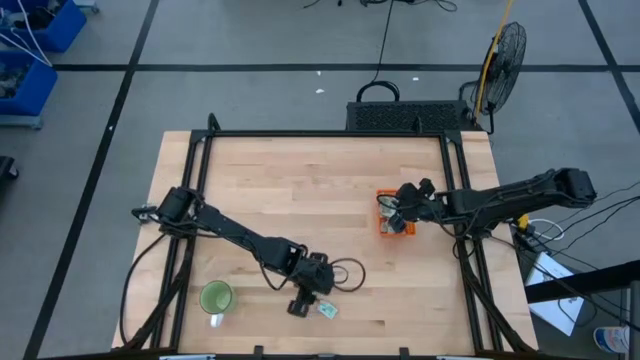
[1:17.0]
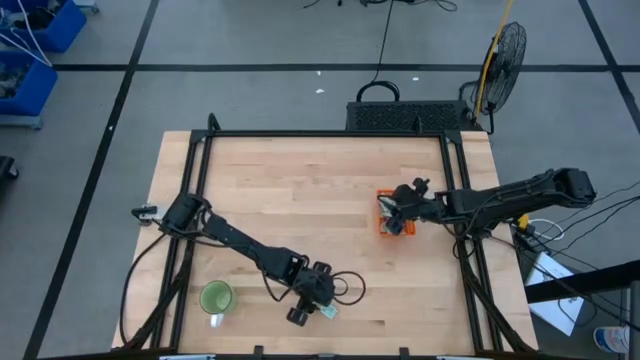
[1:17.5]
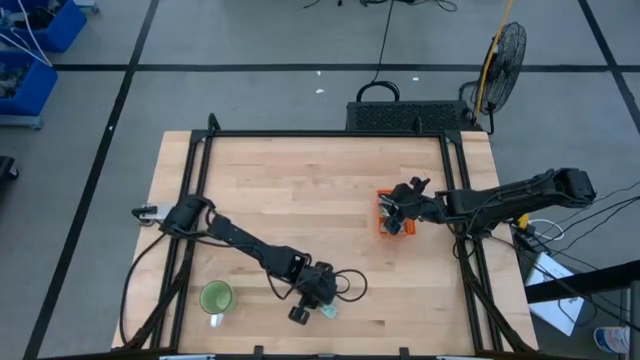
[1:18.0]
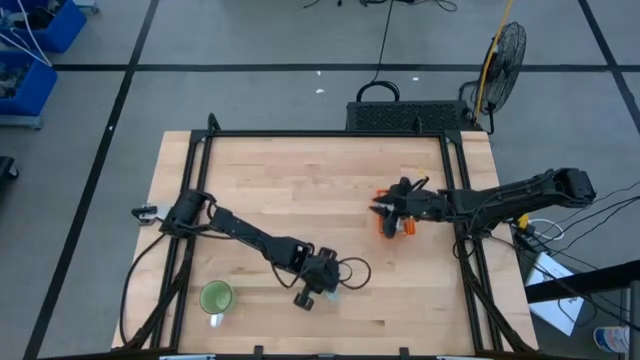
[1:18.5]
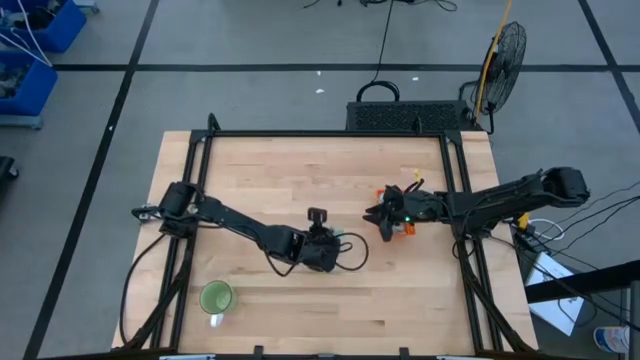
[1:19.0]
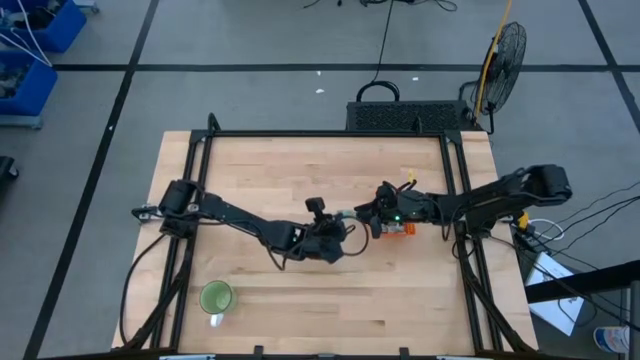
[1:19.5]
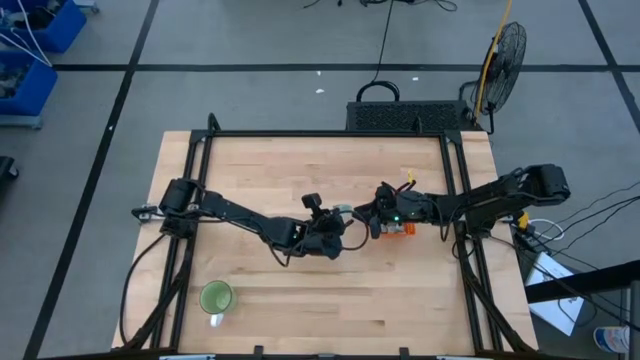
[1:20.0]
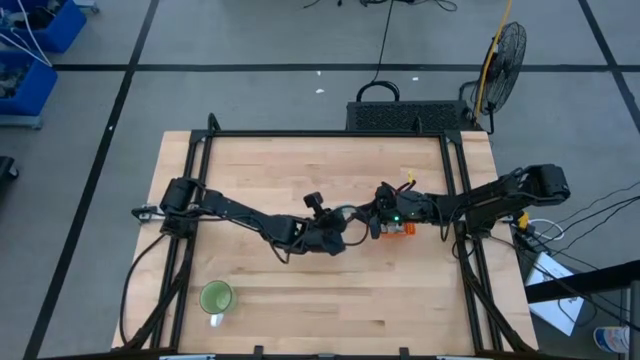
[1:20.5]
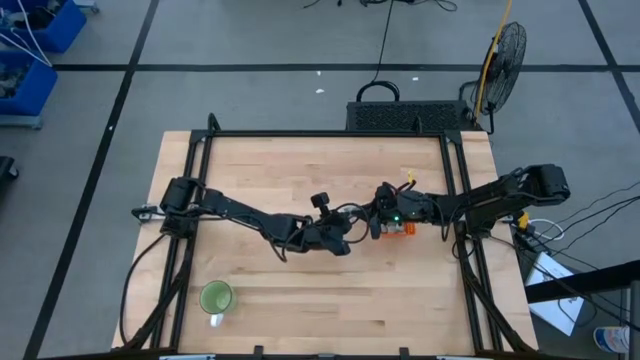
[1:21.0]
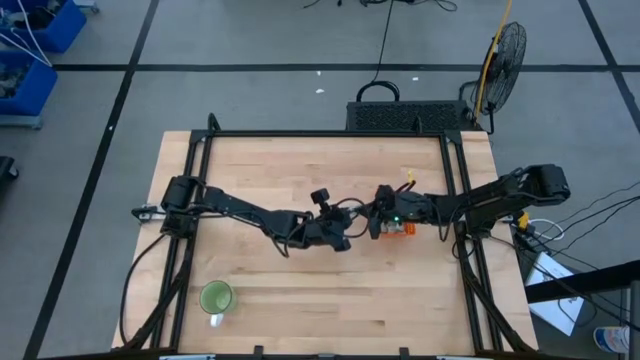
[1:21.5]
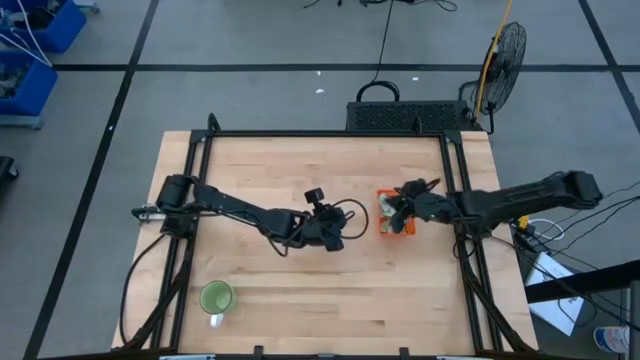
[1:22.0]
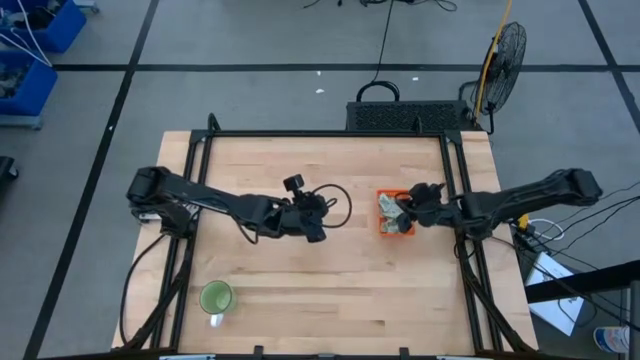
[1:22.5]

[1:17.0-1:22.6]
Task: Pick and place Stevia / Truvia into bins
Put the stevia packet into the orange basket

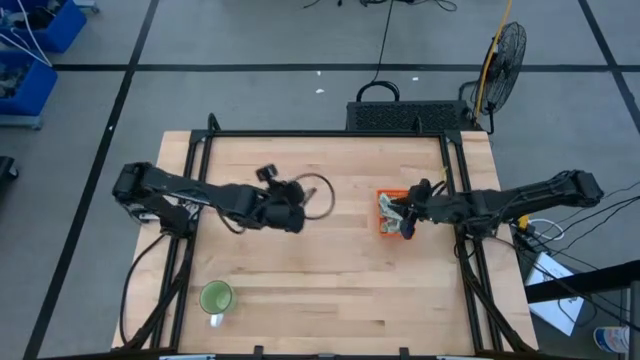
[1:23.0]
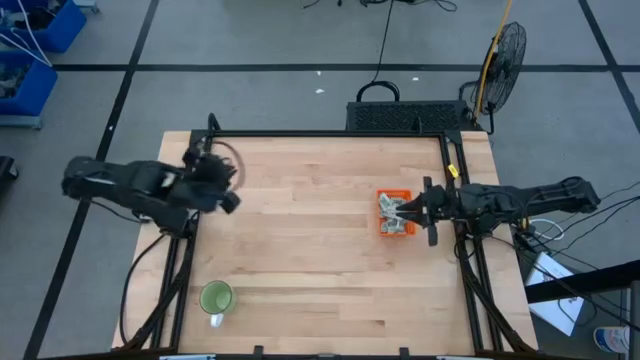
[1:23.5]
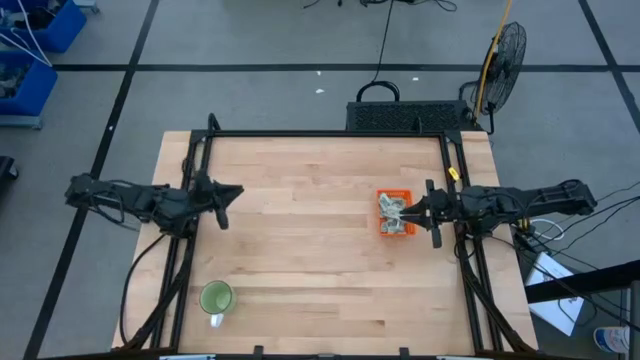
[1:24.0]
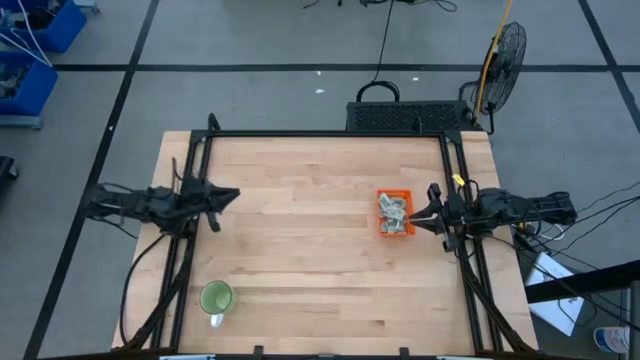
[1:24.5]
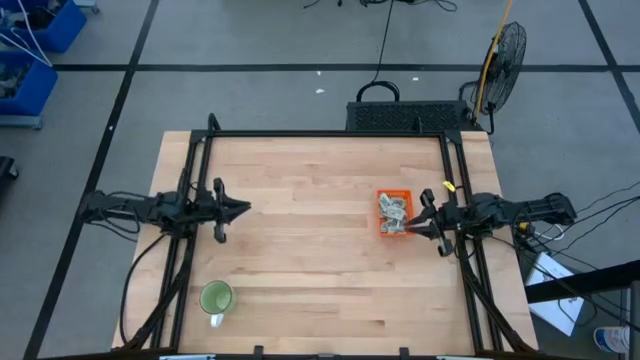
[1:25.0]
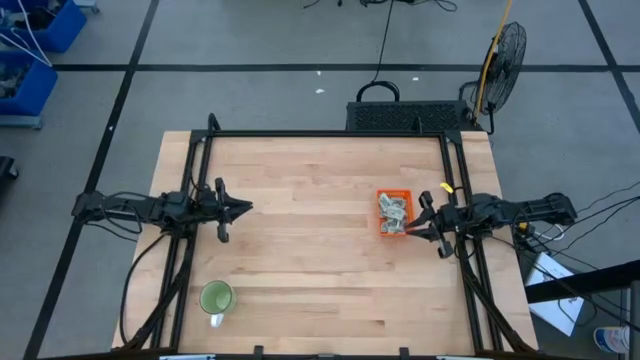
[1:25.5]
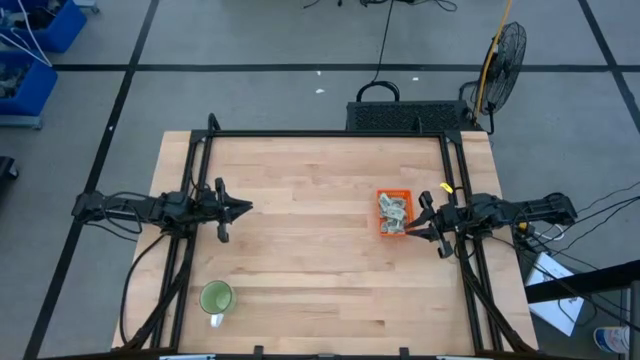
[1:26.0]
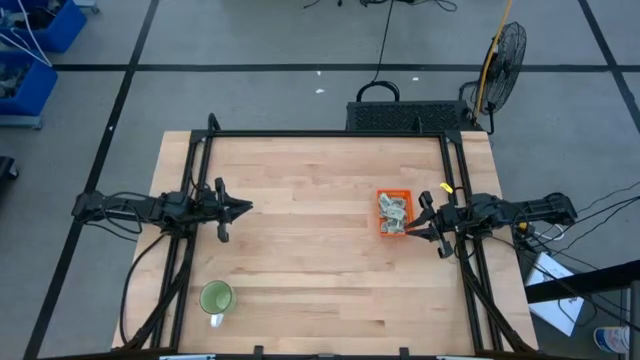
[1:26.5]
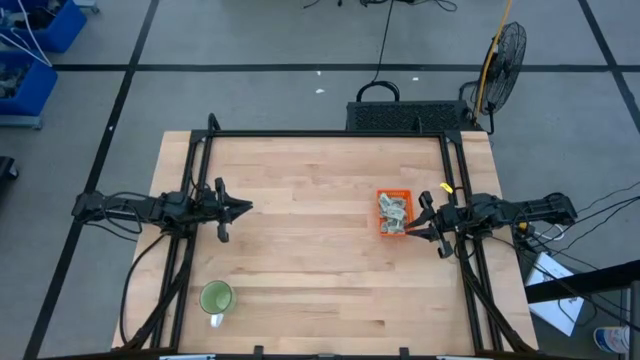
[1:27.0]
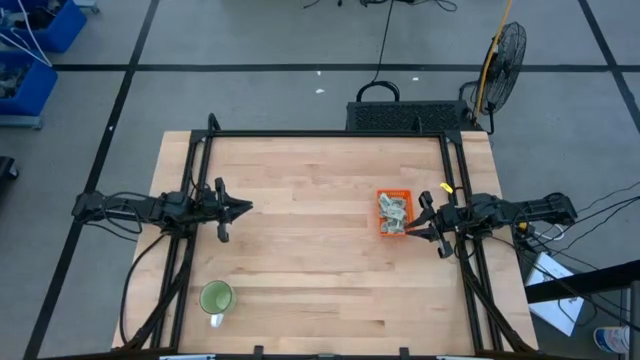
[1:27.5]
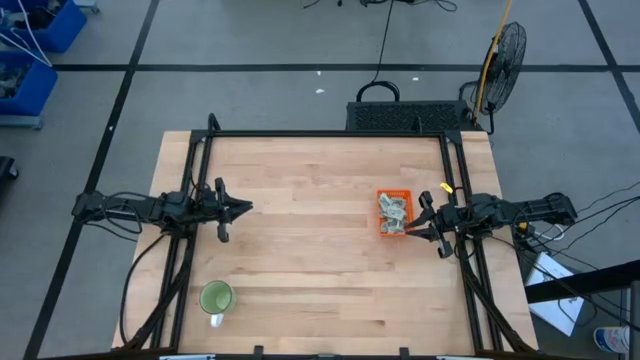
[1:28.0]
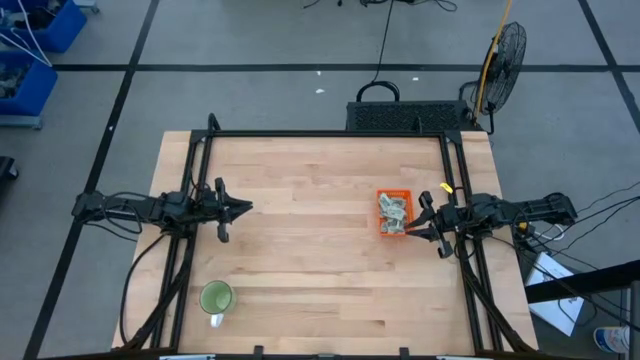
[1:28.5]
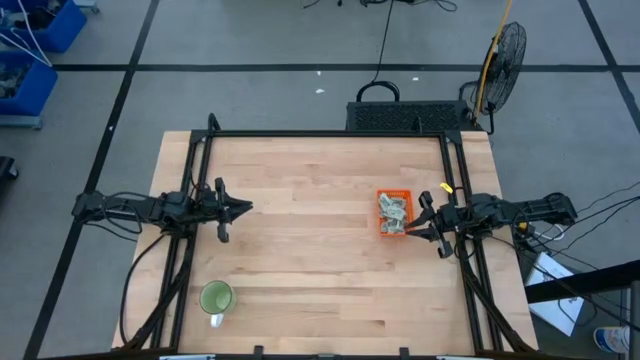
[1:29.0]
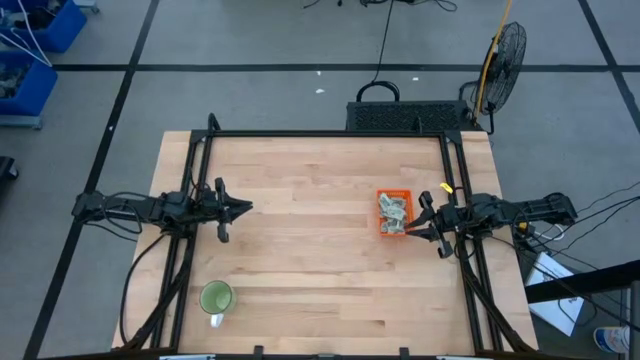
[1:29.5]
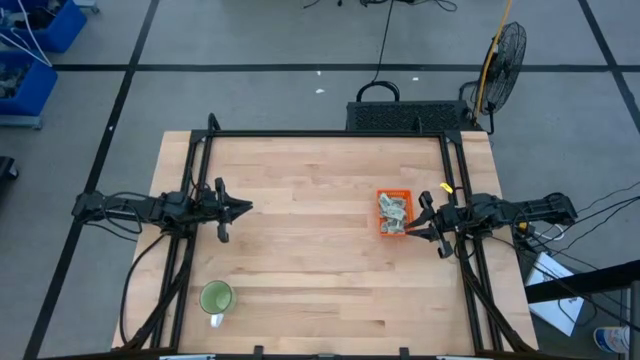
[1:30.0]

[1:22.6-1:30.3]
Return to Home Position

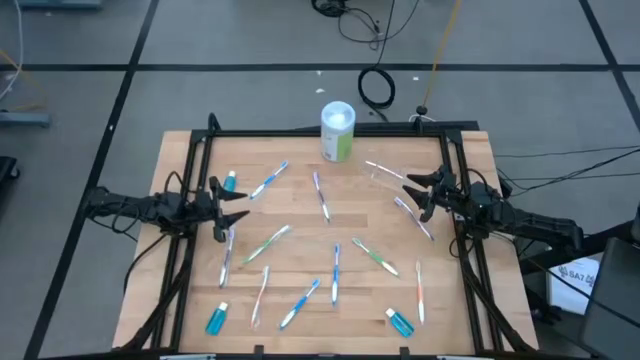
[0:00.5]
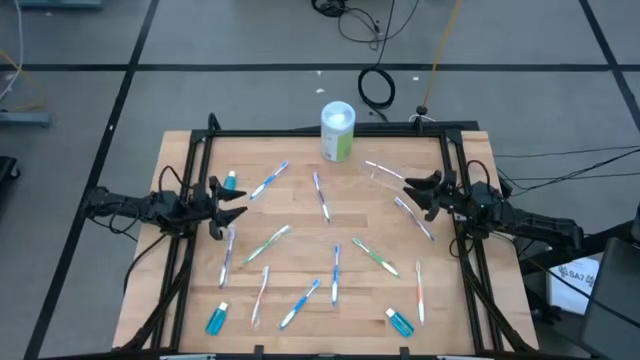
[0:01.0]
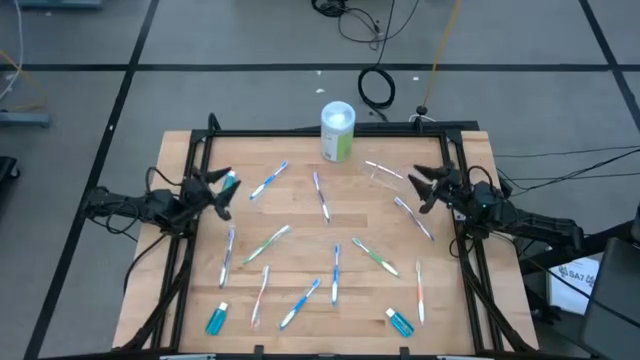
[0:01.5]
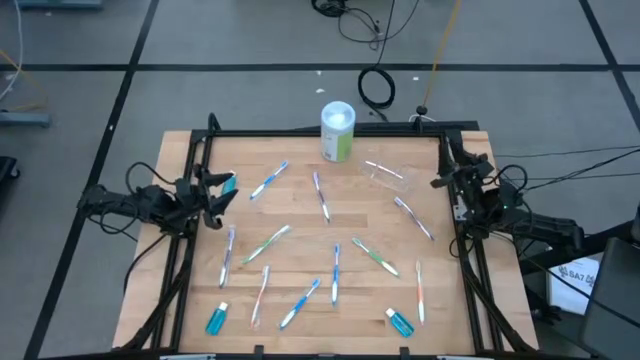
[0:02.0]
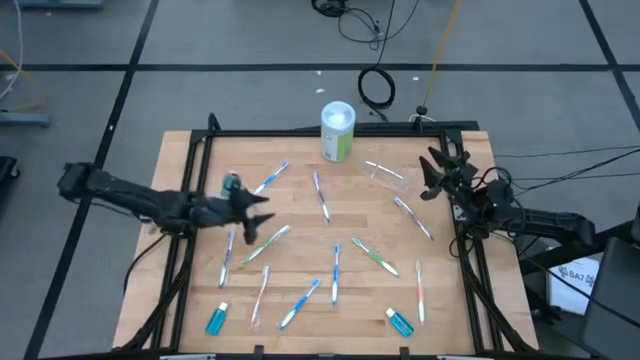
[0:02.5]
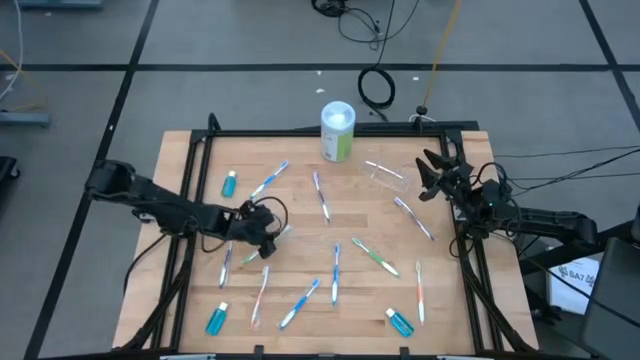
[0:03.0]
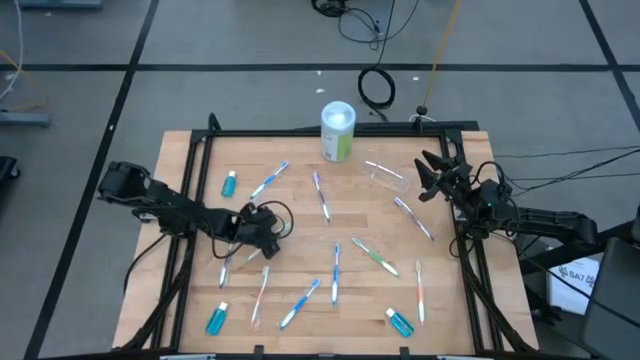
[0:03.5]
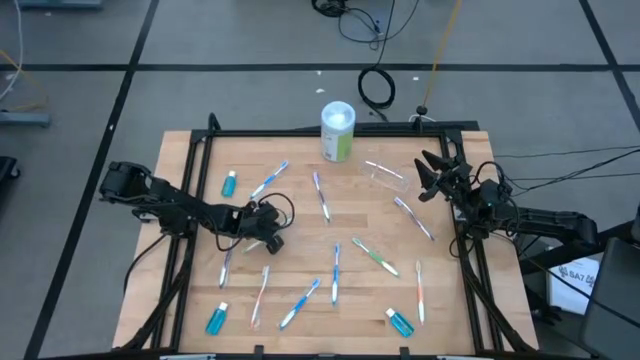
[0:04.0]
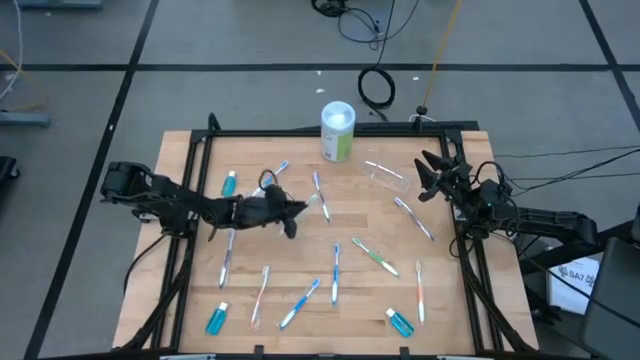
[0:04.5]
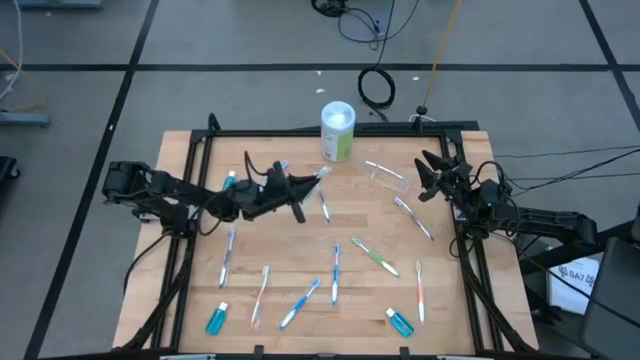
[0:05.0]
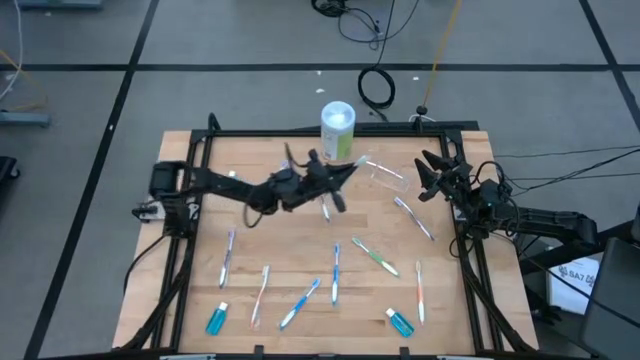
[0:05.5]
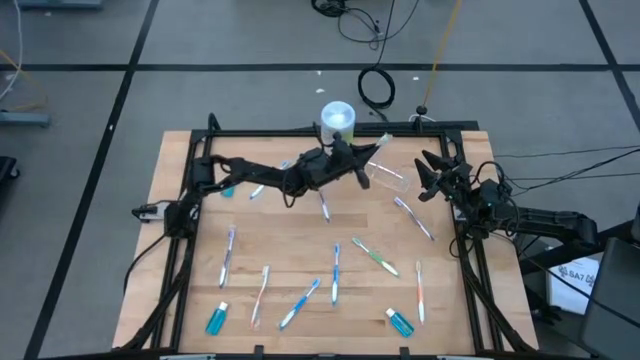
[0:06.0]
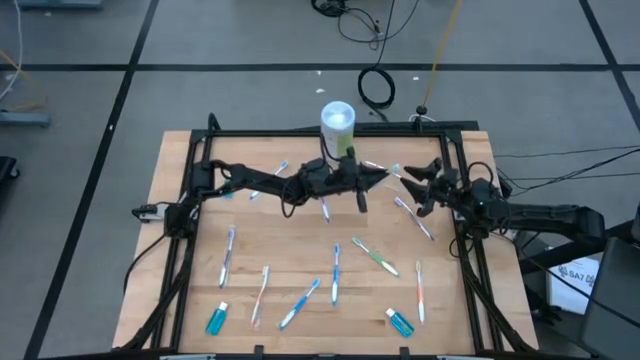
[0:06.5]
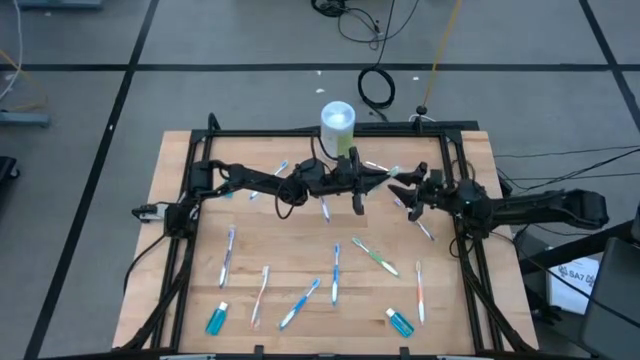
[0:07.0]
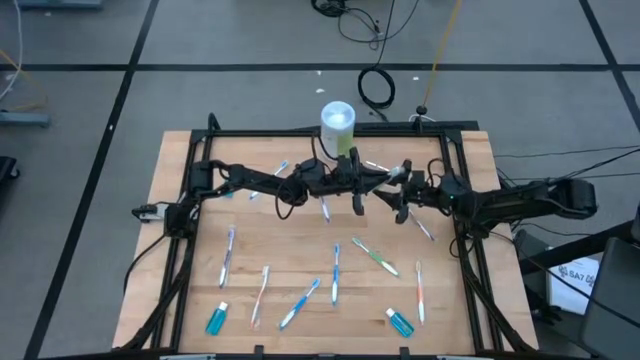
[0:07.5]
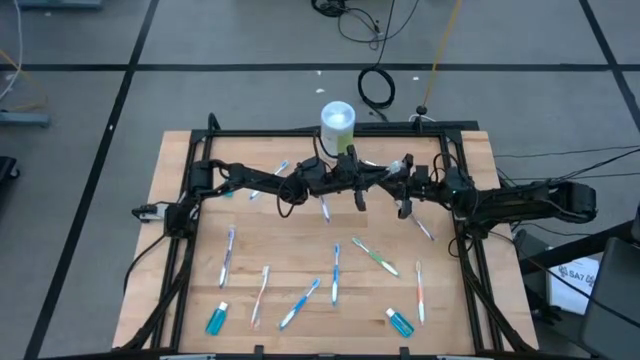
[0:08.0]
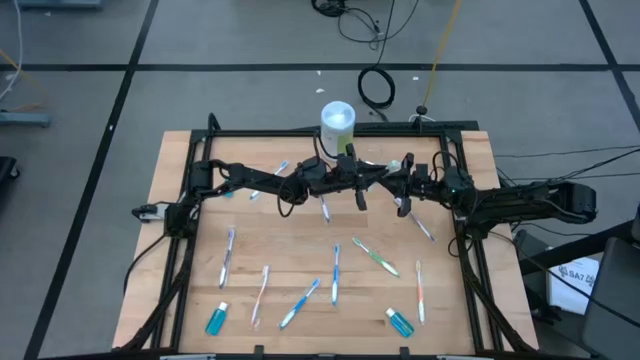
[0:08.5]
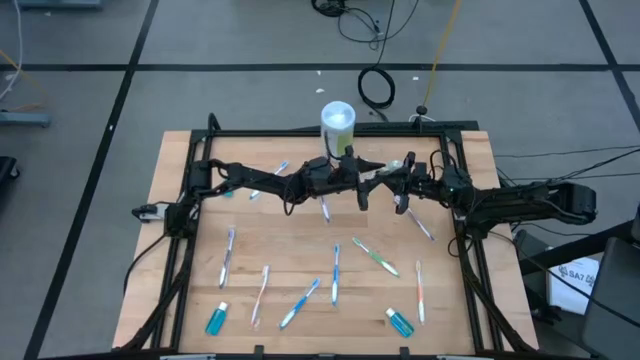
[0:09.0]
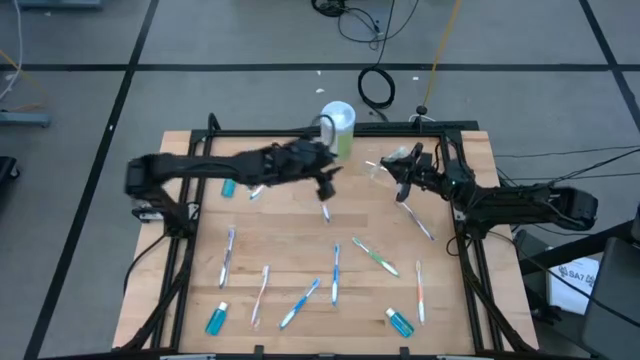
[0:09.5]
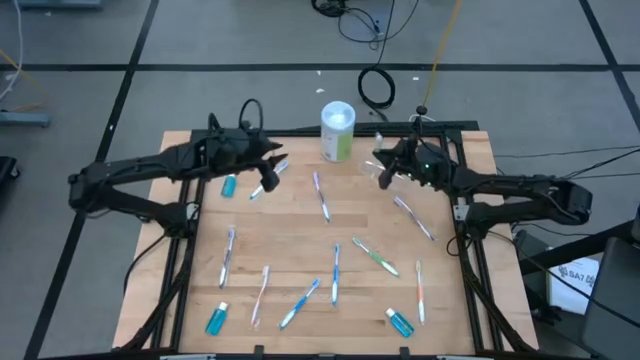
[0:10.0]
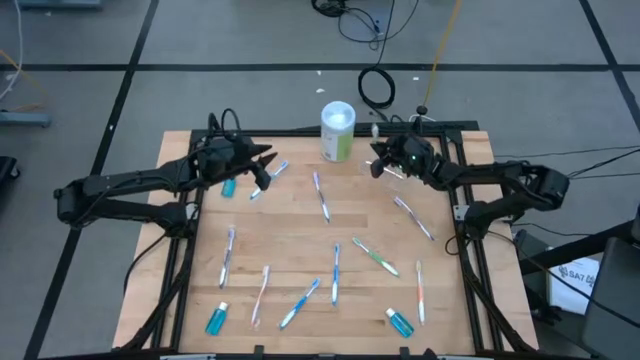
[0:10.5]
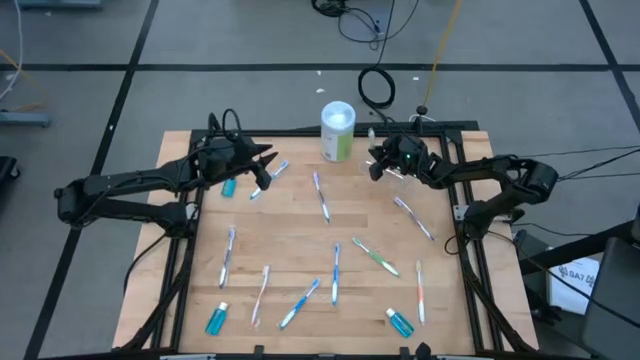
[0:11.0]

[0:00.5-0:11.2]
Task: Pick & Place toothbrushing station
Put the left green toothbrush into the transparent organizer
